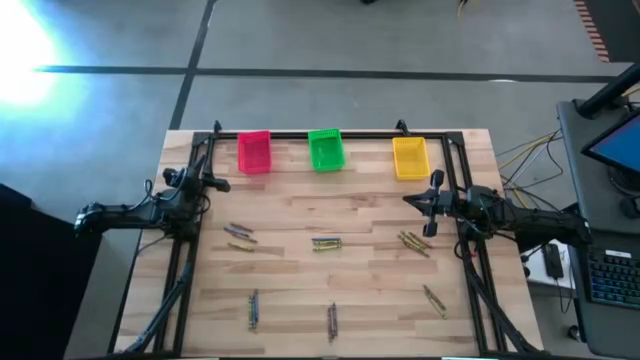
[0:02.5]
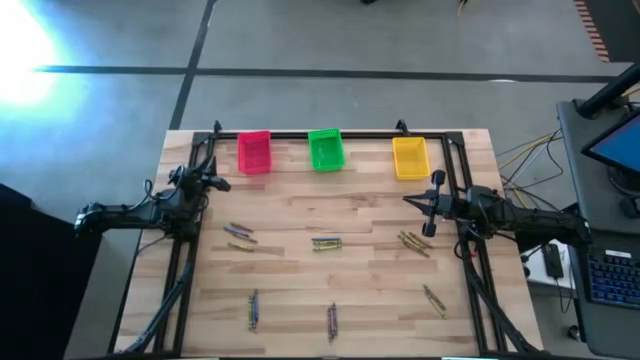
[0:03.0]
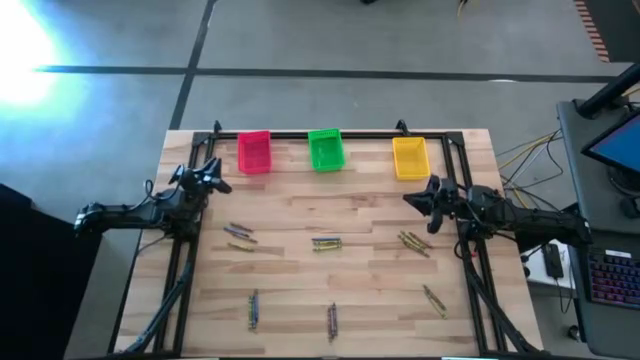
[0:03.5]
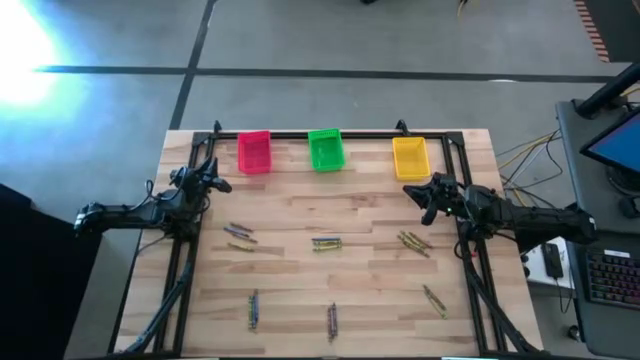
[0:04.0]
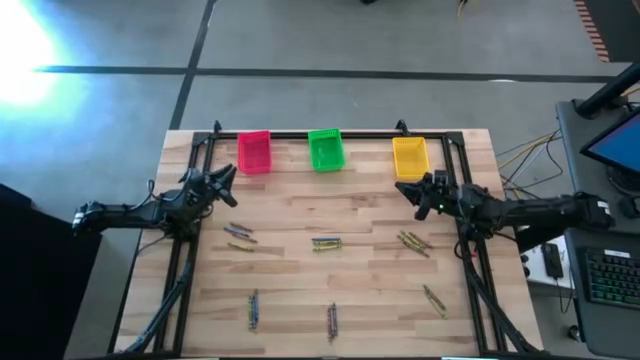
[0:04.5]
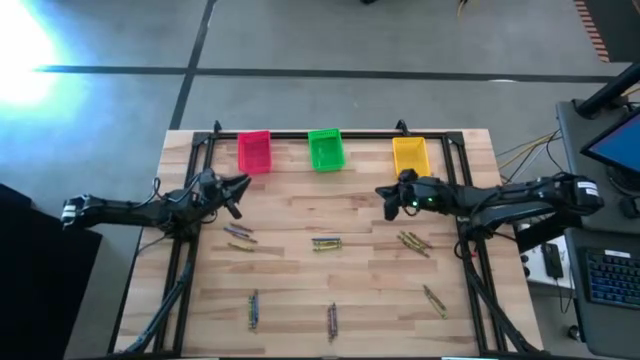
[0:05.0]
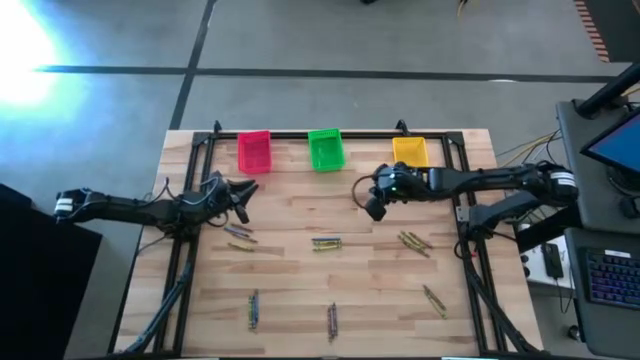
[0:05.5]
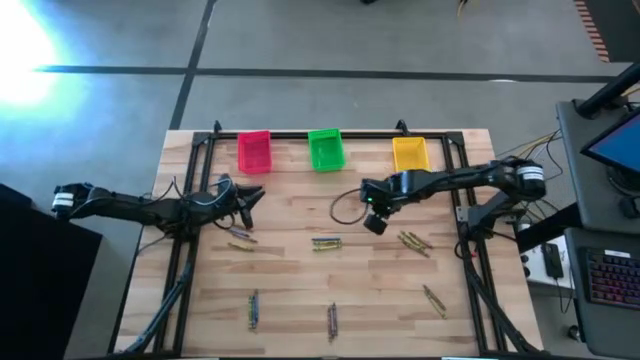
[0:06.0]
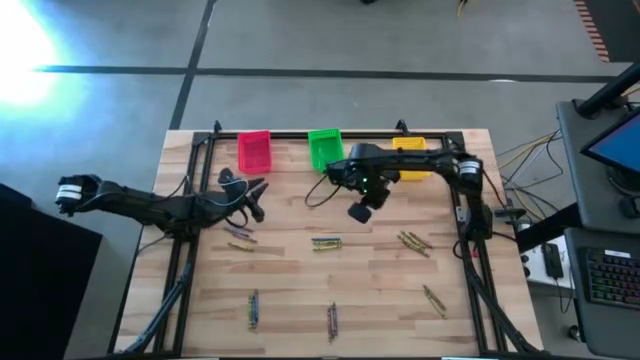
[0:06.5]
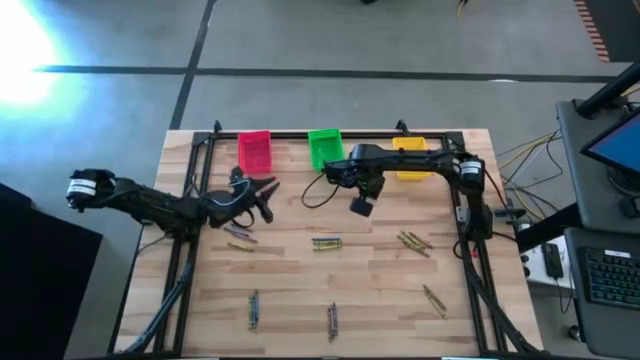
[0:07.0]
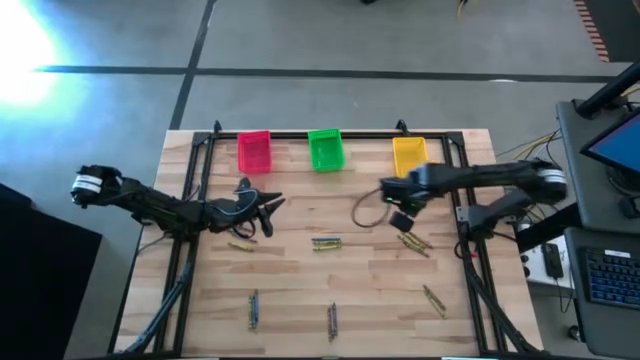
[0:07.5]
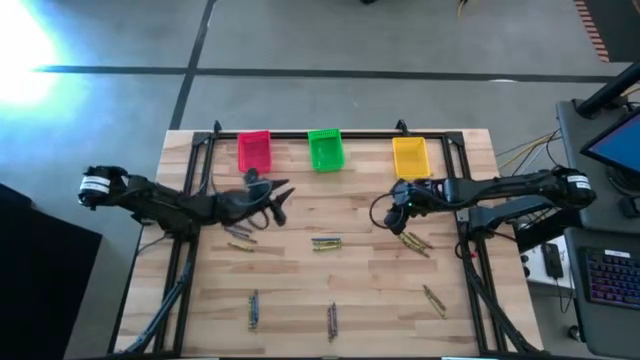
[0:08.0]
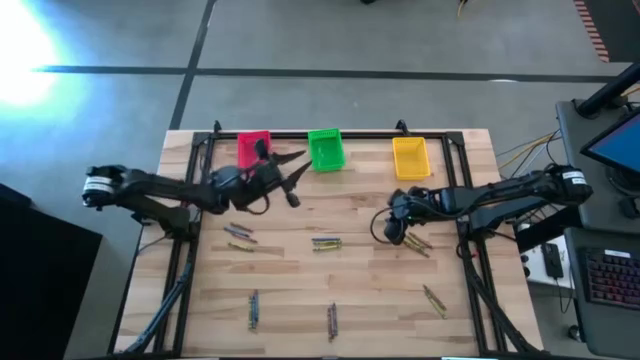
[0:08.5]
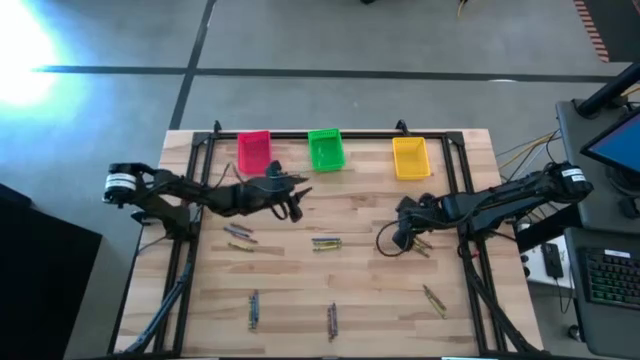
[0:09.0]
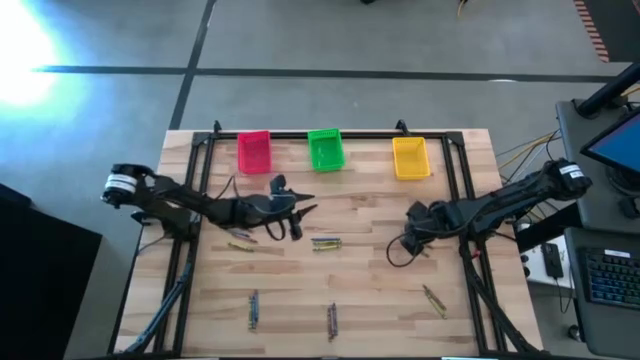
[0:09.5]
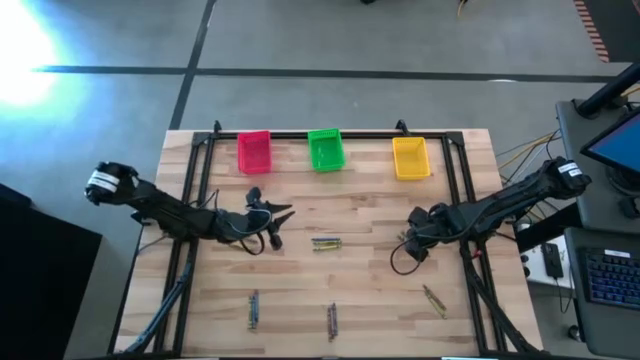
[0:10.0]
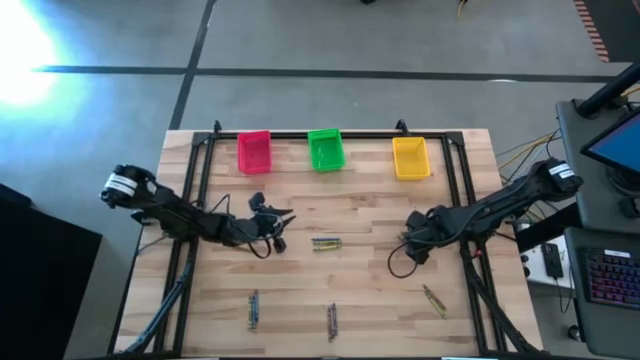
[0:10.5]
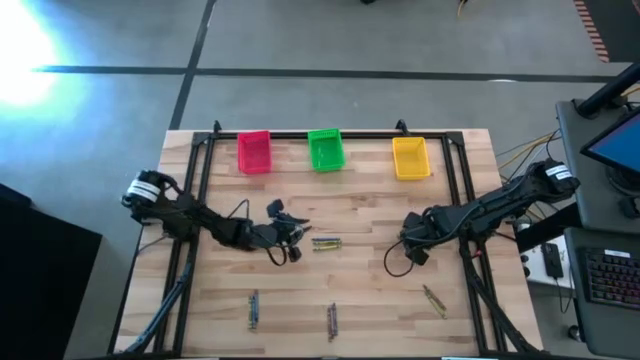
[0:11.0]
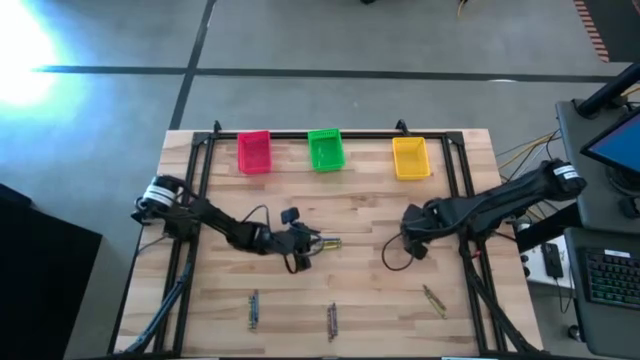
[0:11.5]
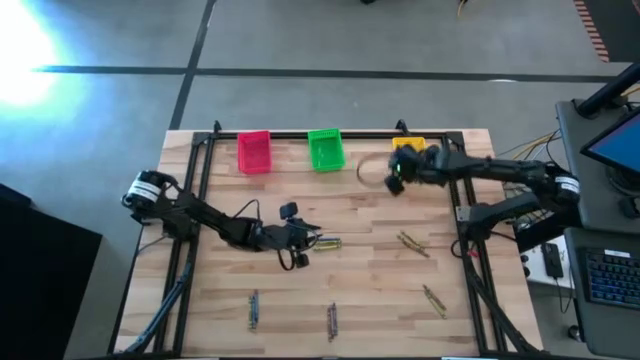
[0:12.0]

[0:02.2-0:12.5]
Task: Sort crayons
Put the brown crayon into the yellow basket

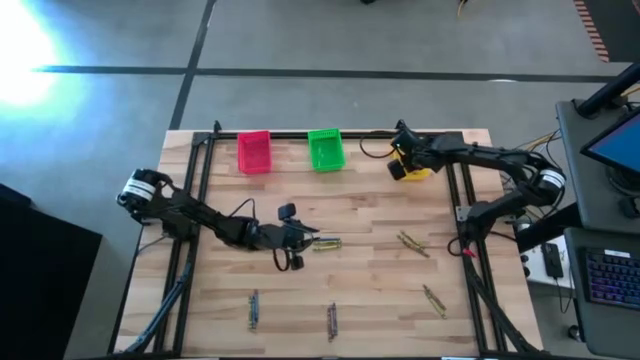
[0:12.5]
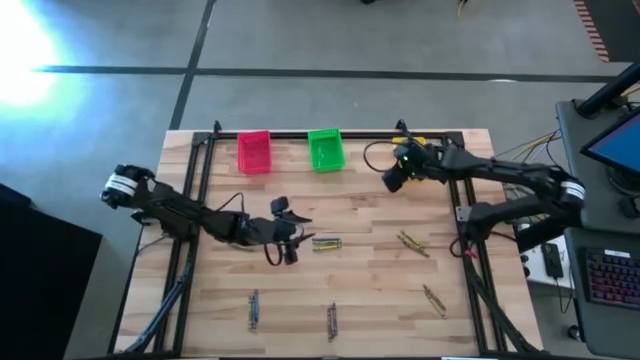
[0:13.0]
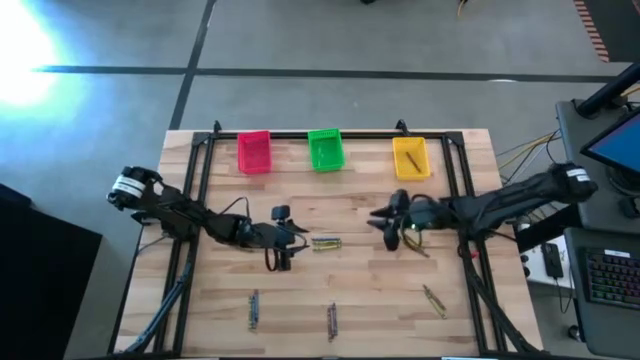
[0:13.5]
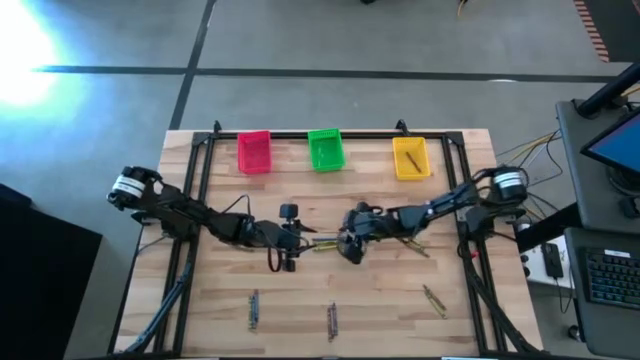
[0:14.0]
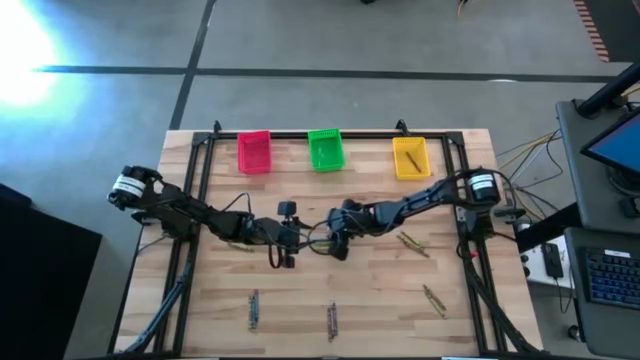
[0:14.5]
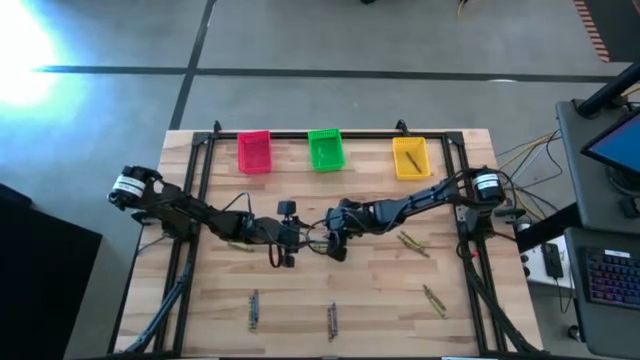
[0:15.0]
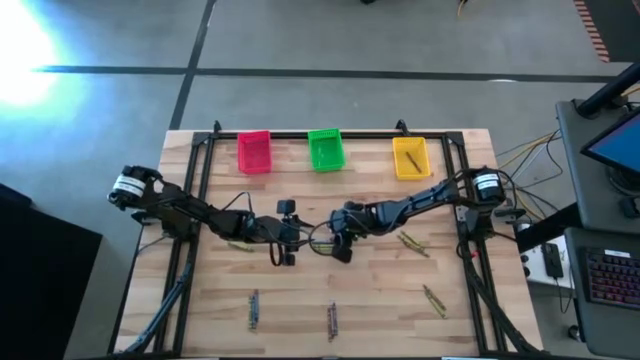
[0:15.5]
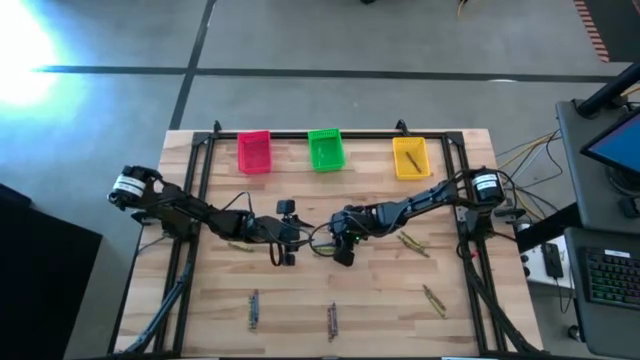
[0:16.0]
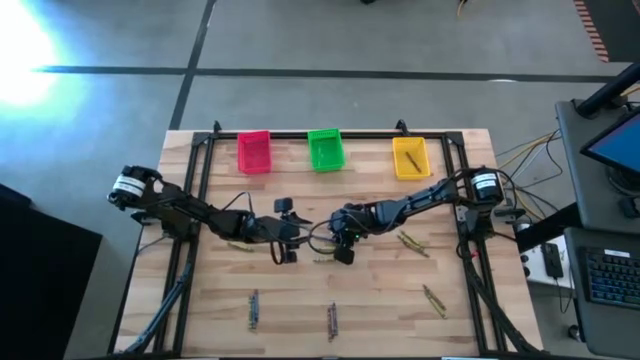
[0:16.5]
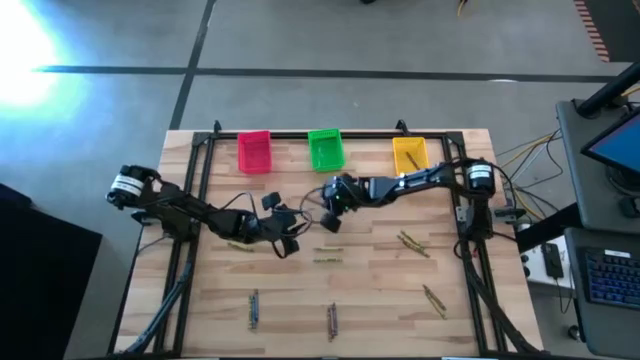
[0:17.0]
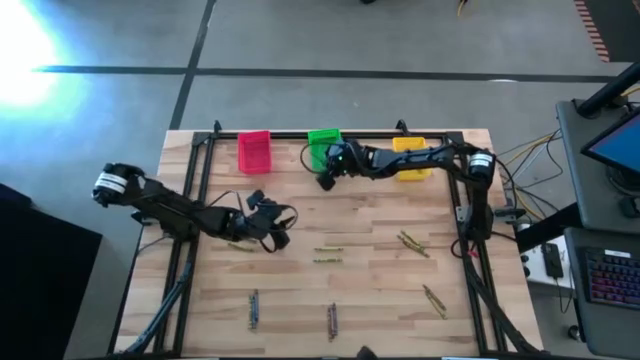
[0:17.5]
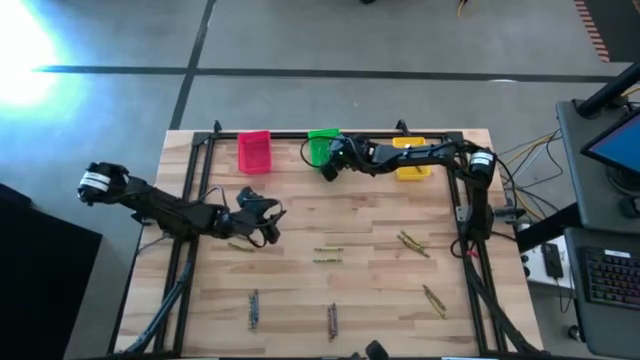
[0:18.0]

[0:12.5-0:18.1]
Put the blue crayon into the green basket

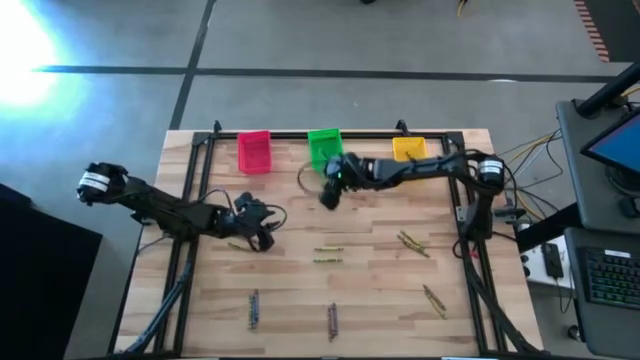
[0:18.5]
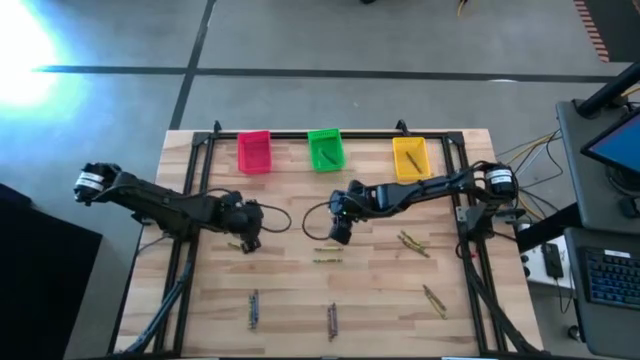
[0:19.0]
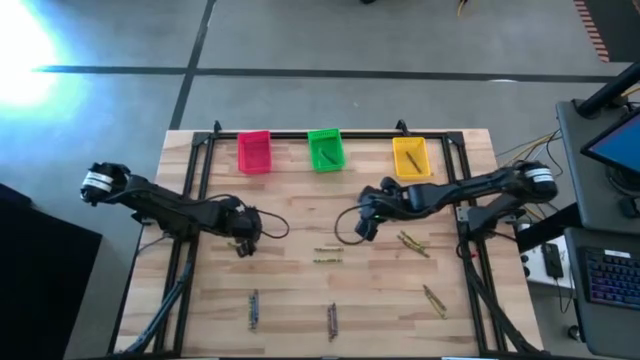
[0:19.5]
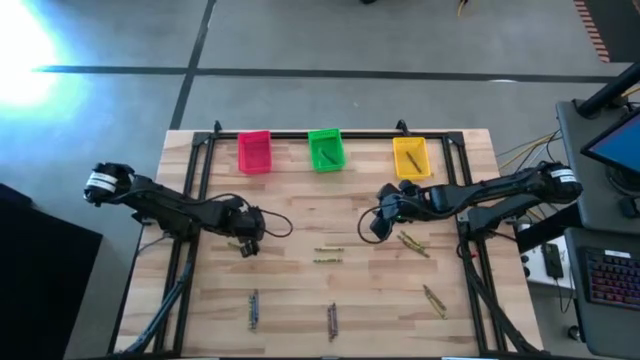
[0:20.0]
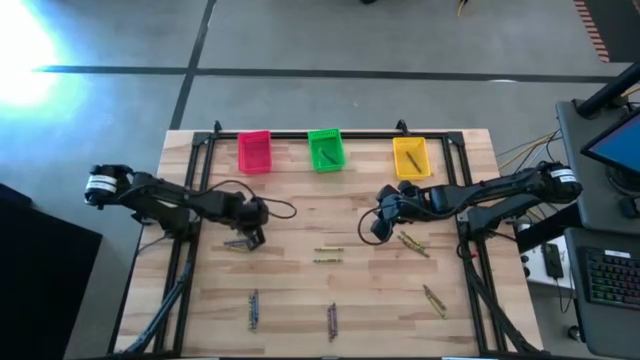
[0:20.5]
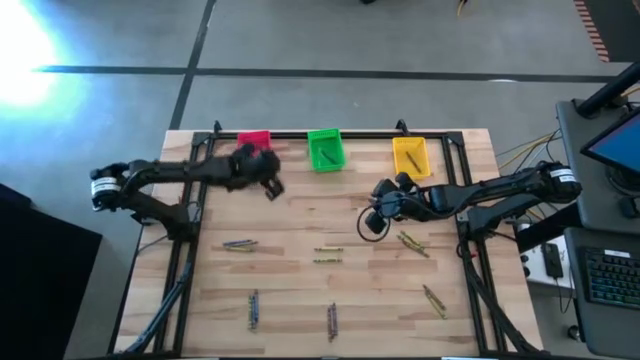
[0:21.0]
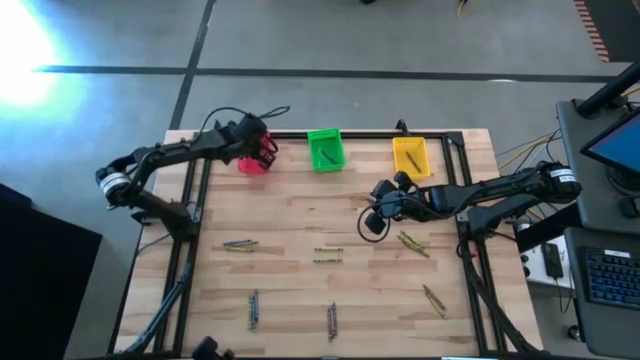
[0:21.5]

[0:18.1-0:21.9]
Put the brown crayon into the red basket

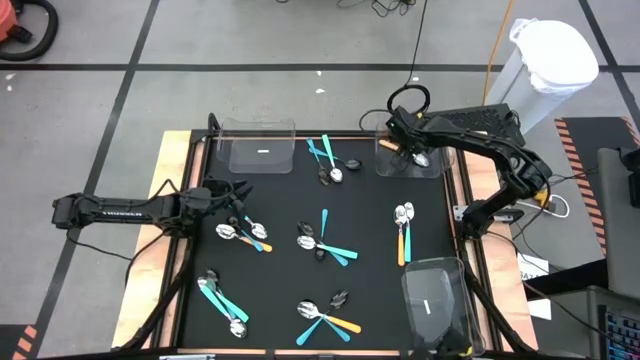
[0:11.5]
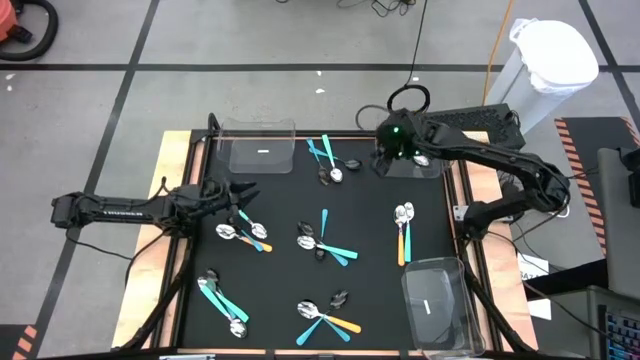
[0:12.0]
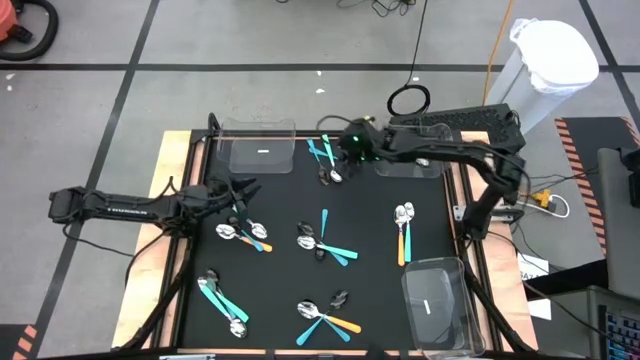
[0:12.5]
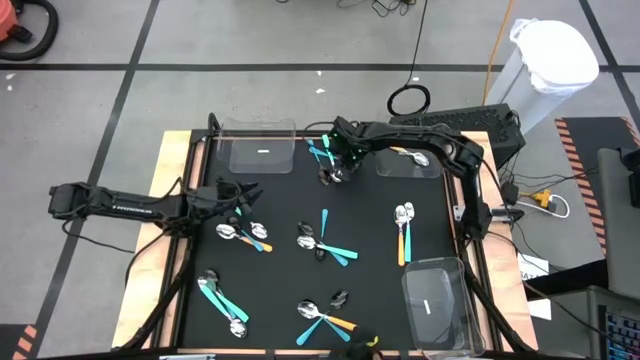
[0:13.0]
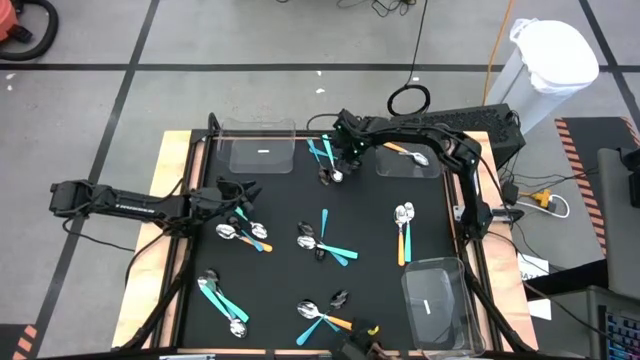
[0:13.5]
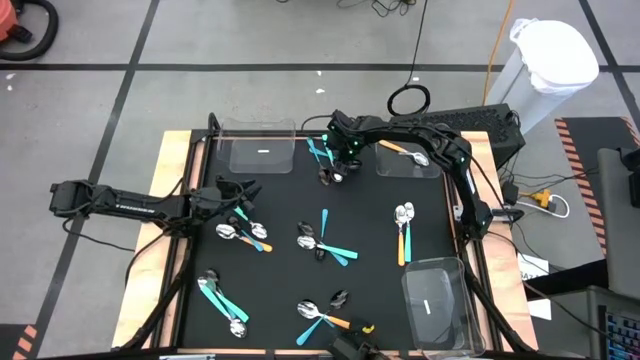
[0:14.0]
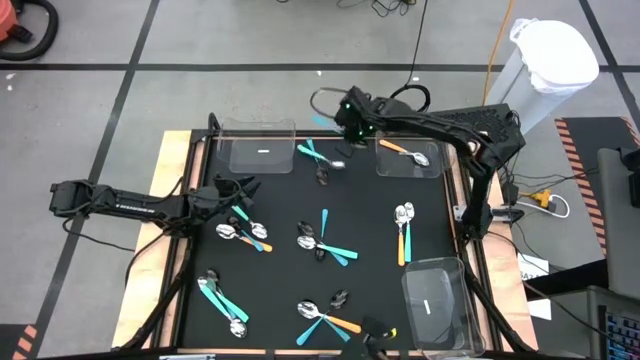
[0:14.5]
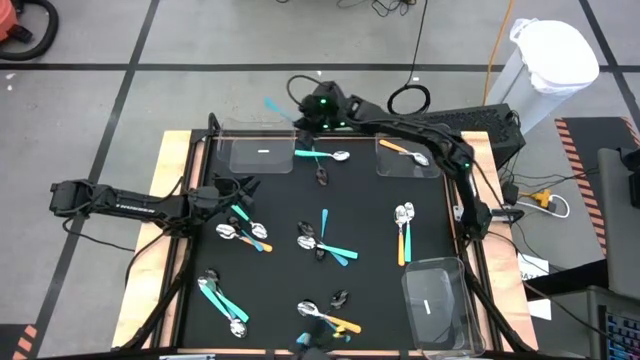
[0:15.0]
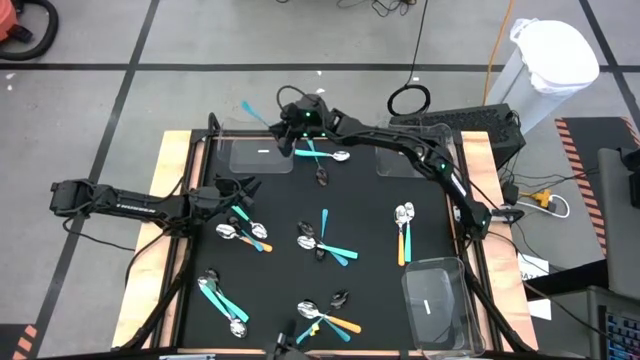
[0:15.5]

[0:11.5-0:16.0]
Task: Sort silverware by color (type)
Put the blue spoon into the top left transparent bin
